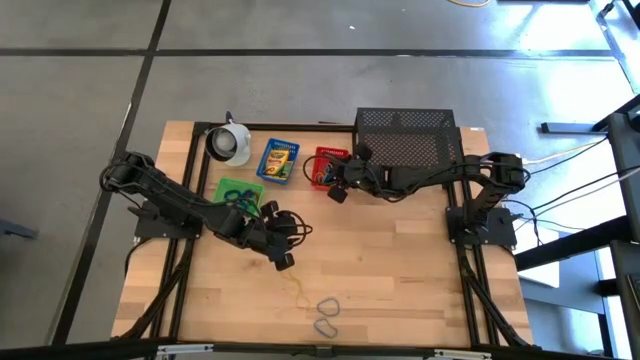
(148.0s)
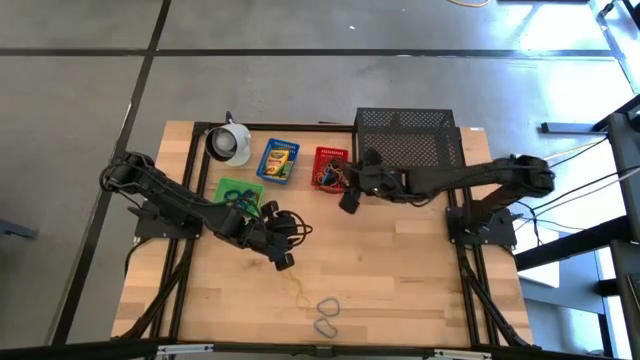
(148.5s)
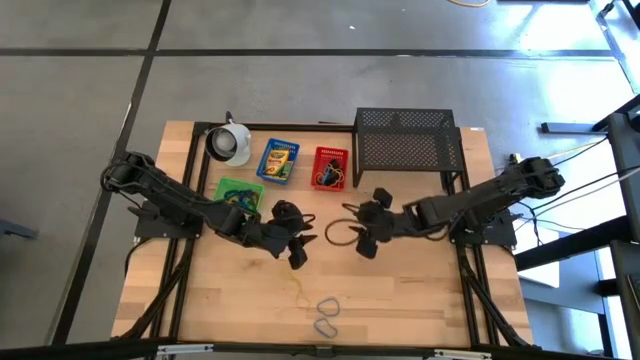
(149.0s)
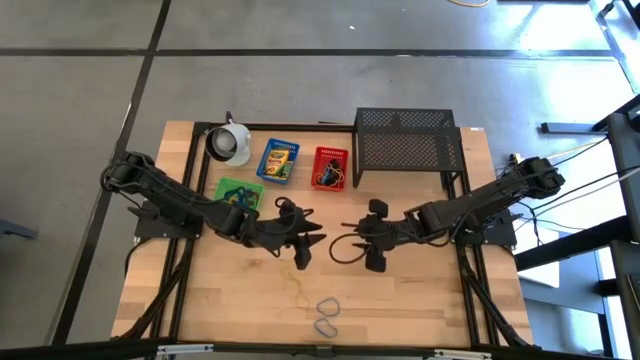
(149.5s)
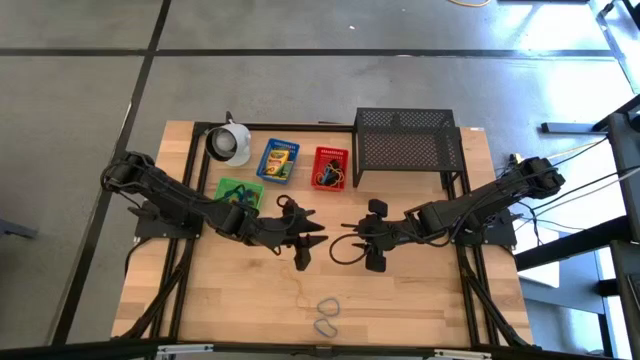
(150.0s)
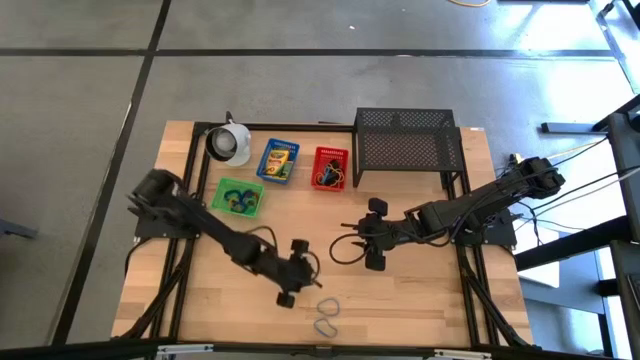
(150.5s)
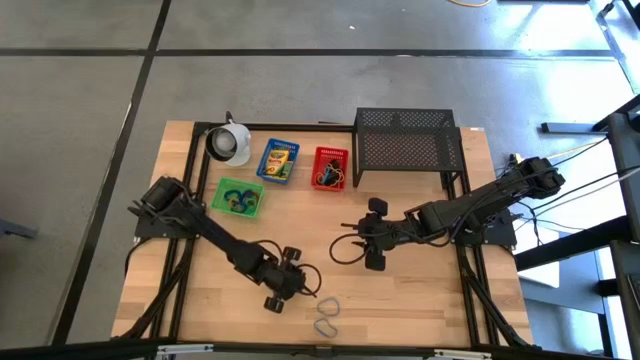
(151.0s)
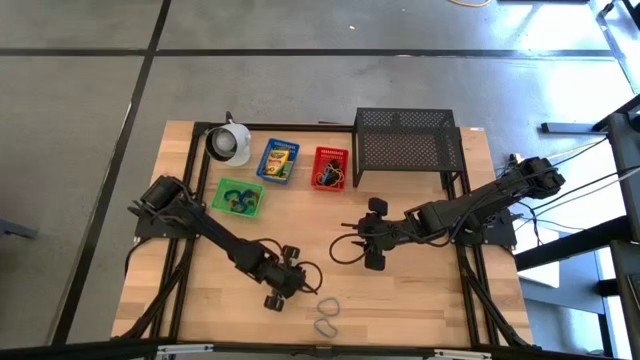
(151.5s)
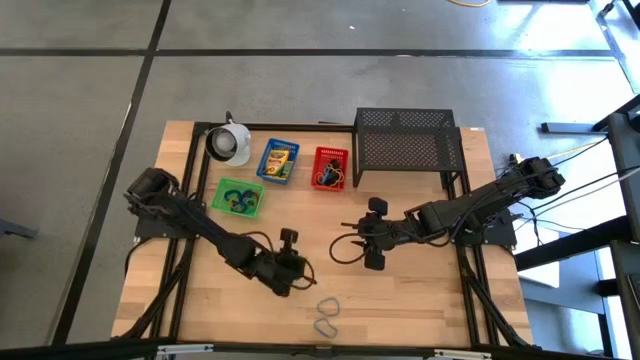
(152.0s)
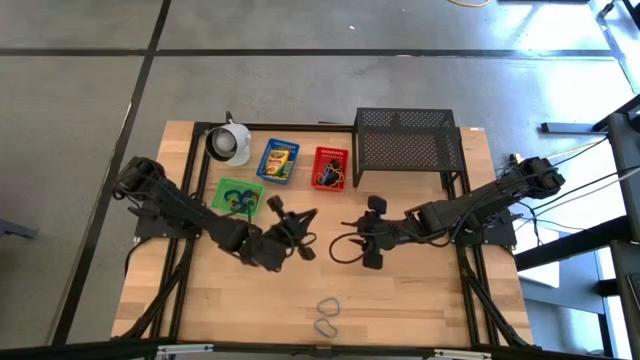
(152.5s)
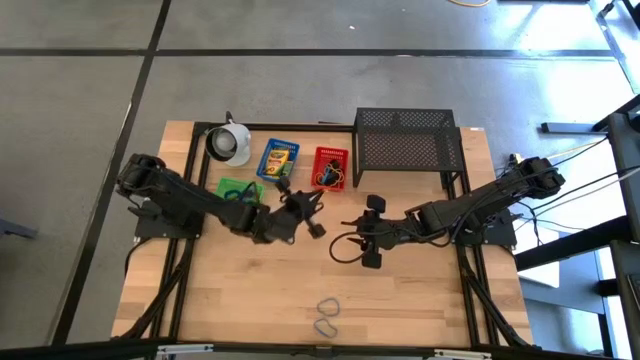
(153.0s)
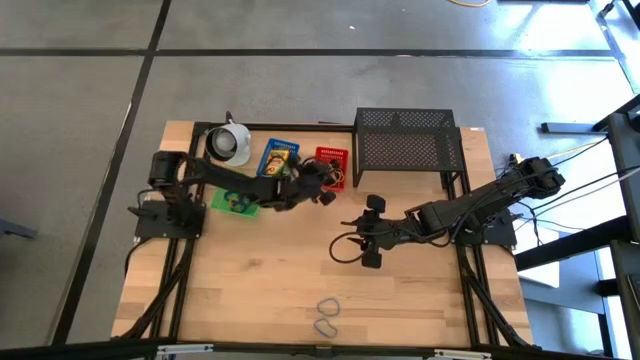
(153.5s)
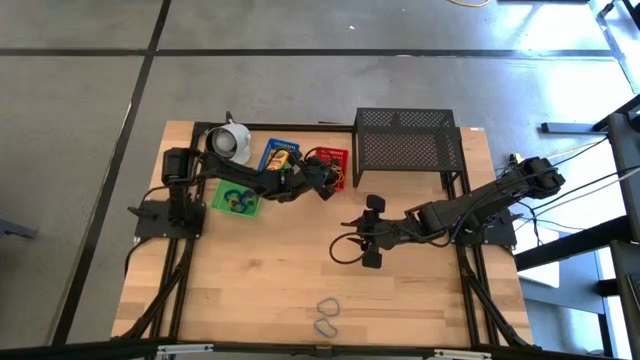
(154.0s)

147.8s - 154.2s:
Task: Pick & Place Office Desk Supplies
Put the yellow rubber band into the red bin

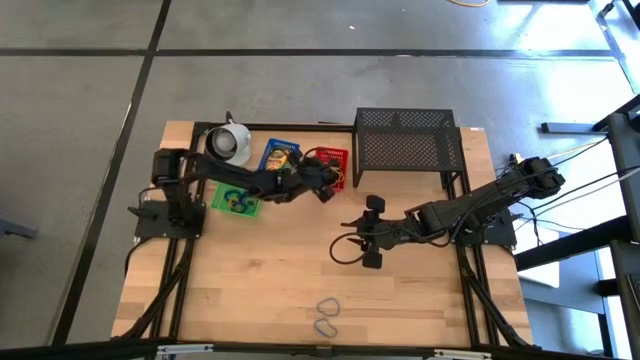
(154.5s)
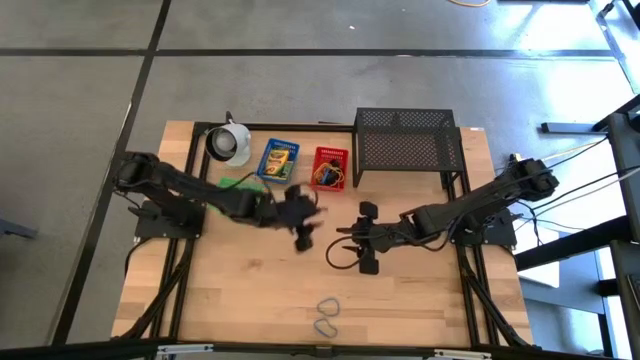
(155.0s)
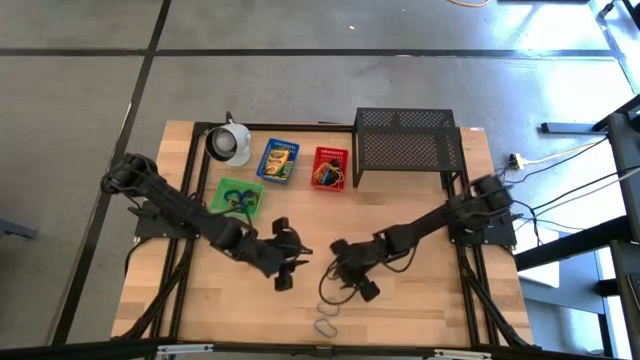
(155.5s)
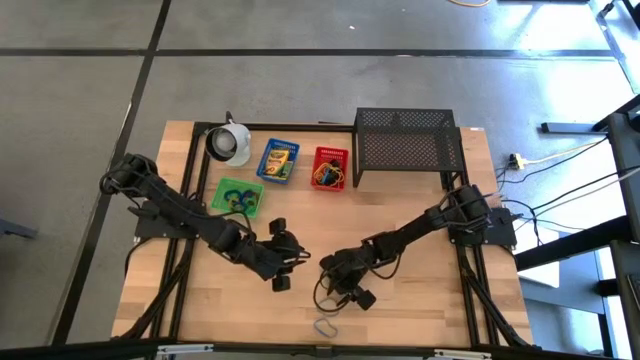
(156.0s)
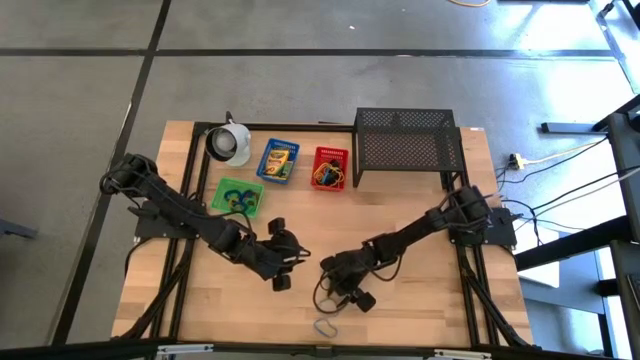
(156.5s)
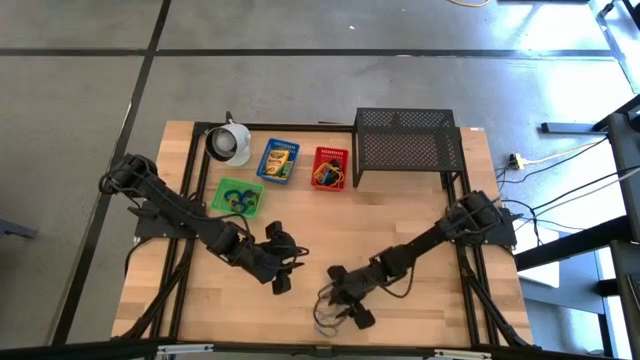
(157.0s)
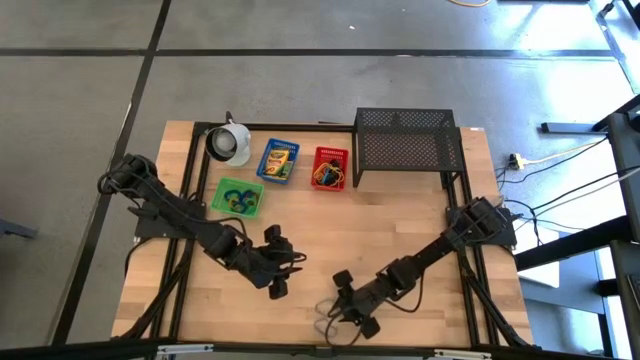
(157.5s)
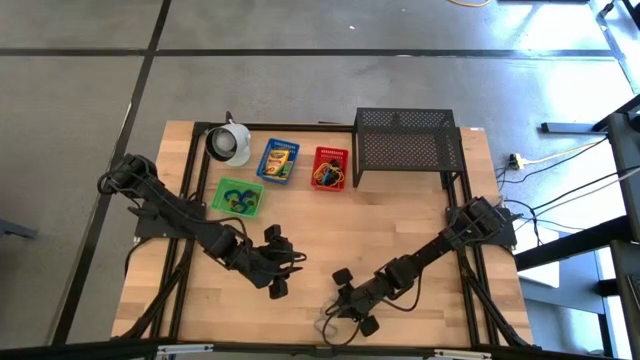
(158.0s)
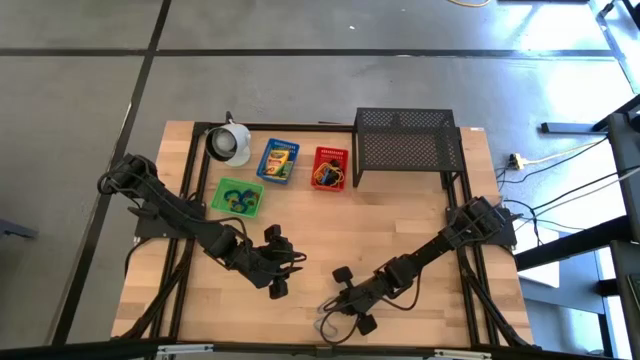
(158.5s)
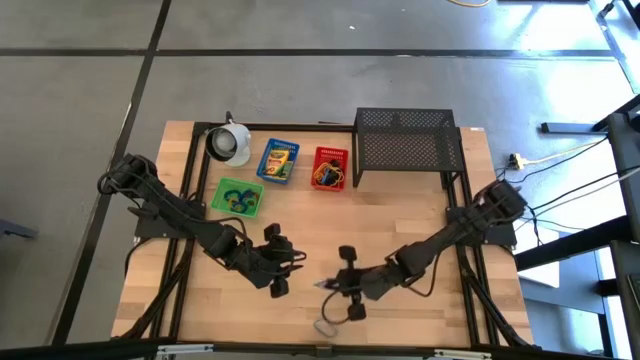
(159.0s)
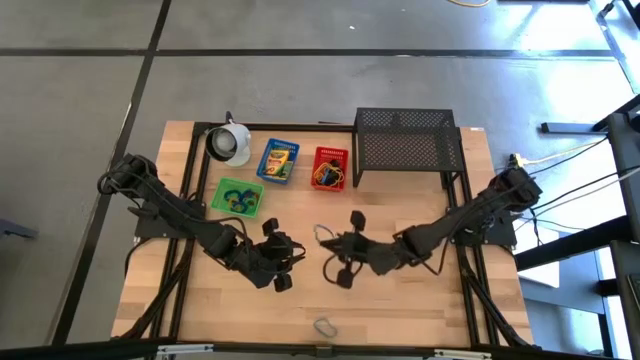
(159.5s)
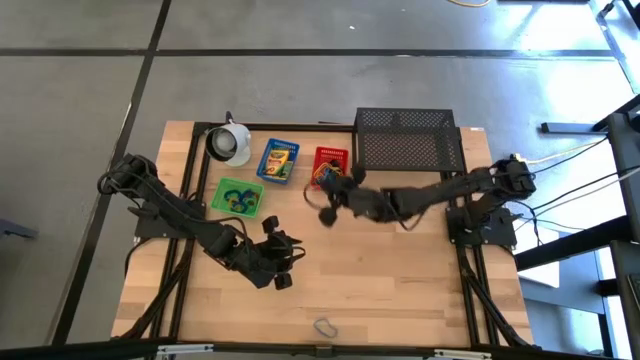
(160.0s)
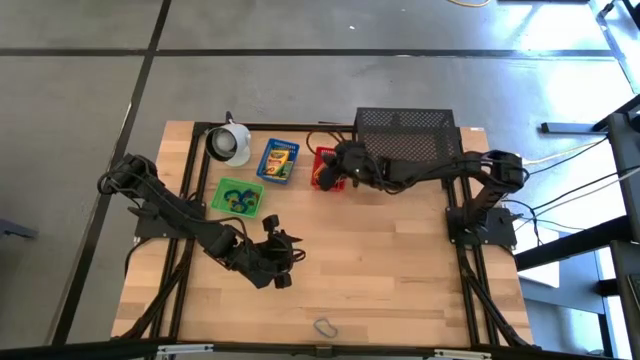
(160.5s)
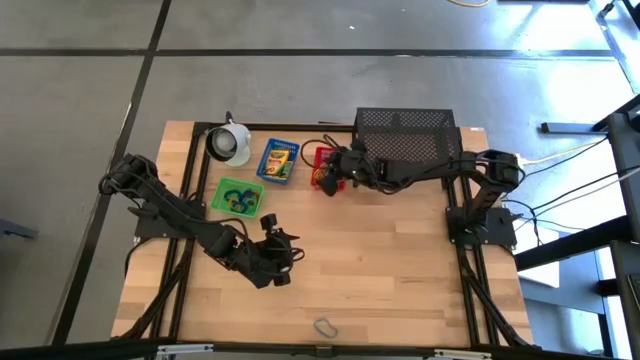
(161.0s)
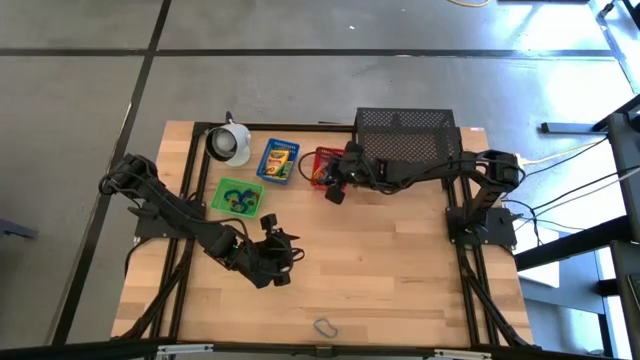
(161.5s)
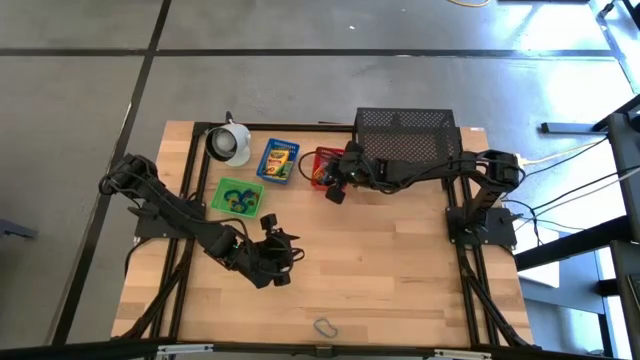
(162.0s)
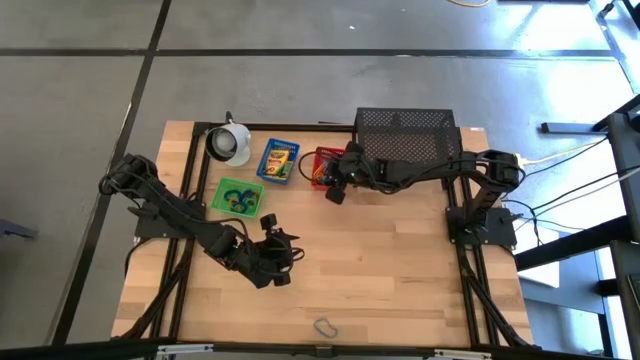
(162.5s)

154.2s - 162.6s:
Put the blue rubber band into the red bin

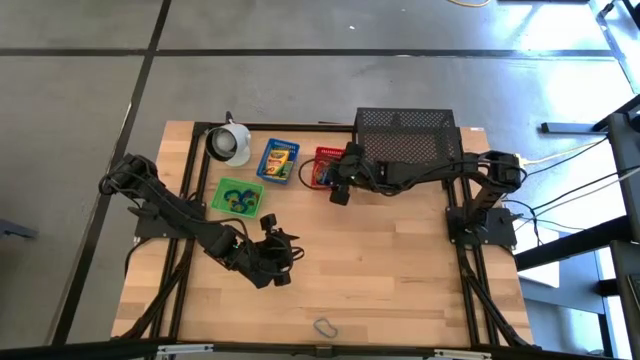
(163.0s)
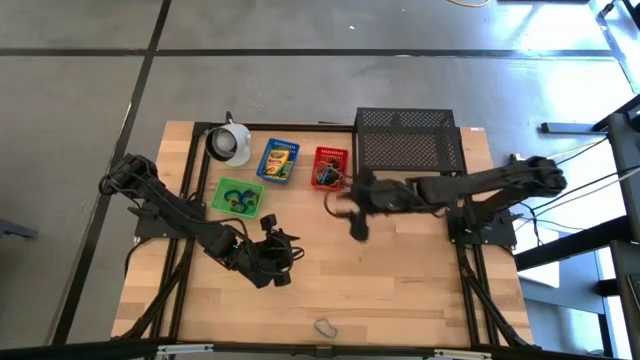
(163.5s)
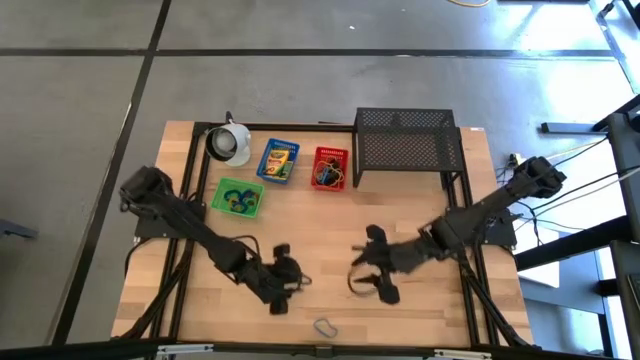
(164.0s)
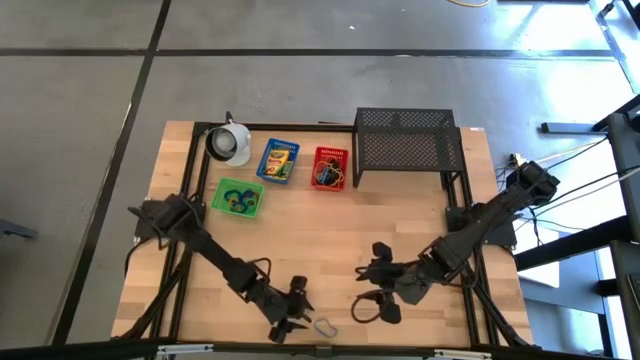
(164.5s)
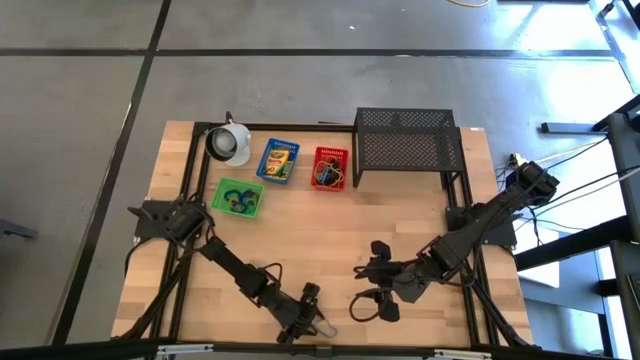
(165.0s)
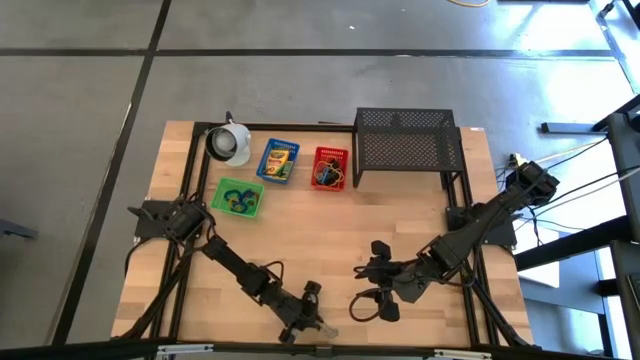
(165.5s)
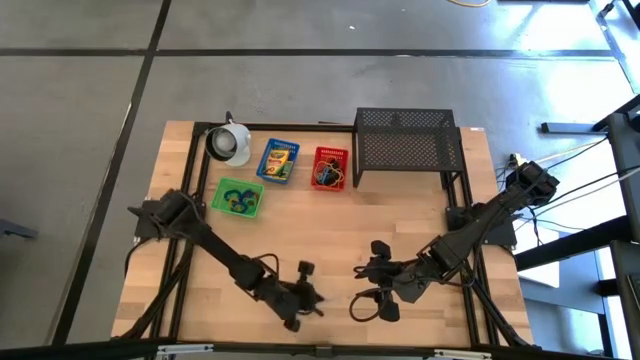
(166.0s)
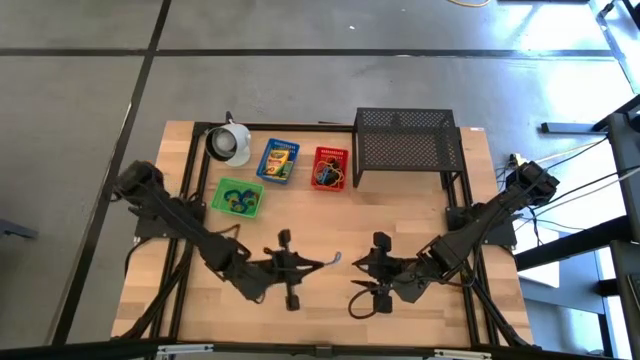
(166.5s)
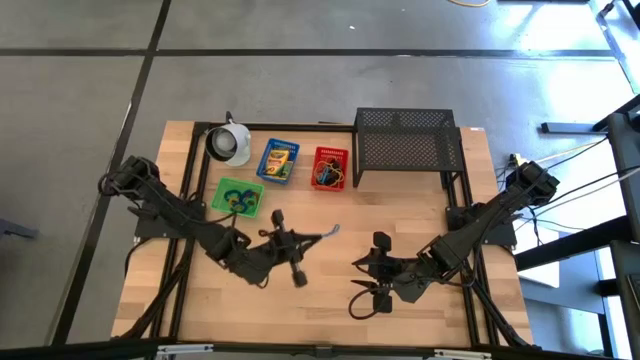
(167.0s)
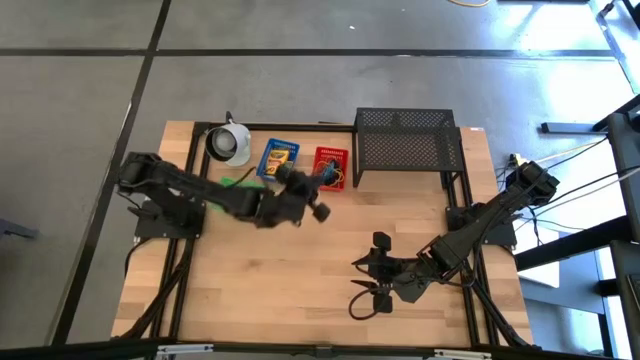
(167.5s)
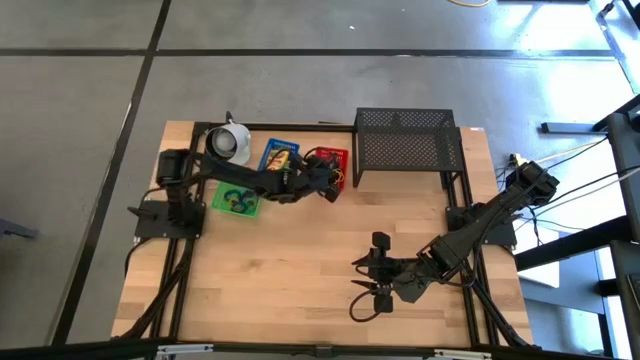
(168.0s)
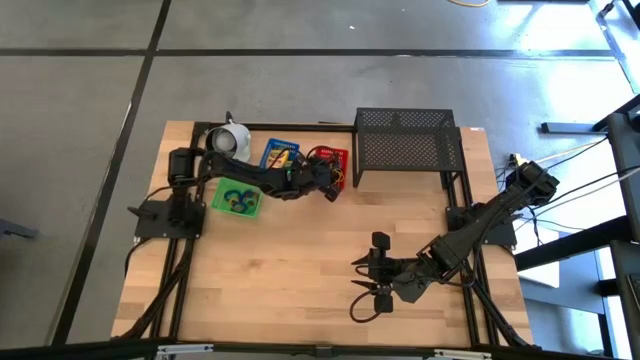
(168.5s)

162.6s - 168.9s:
Put the blue rubber band into the red bin

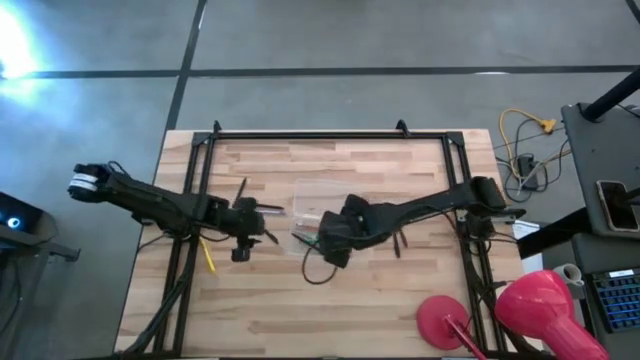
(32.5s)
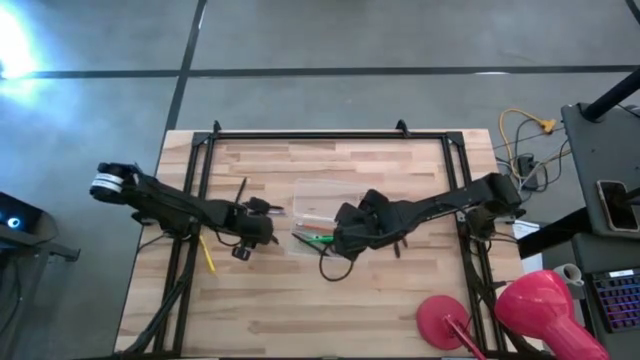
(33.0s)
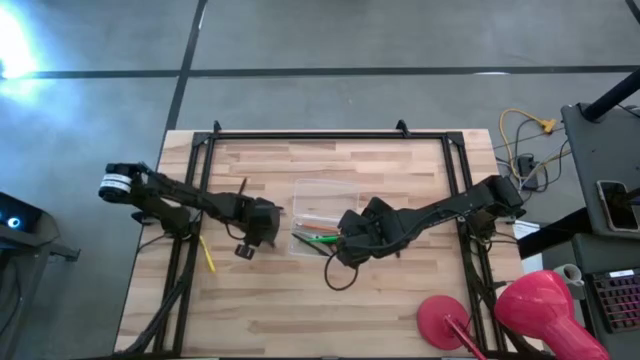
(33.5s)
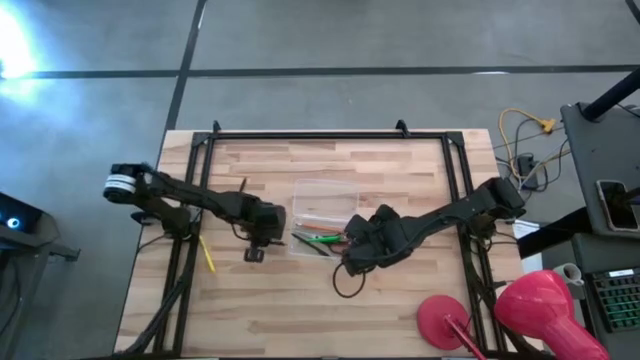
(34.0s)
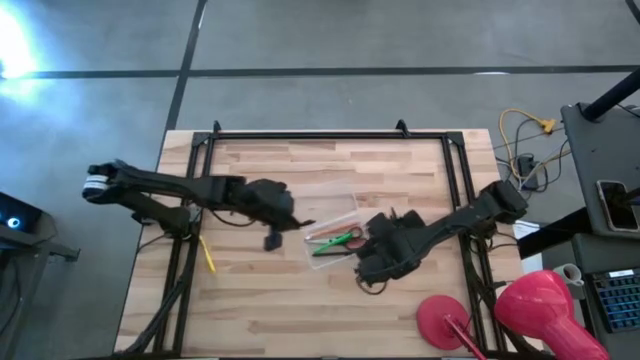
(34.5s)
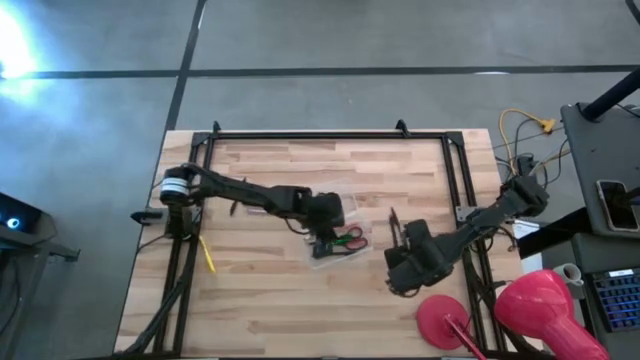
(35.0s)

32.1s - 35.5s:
Task: Pick & place school supplies into a supply box
Put the black pen into the transparent supply box
